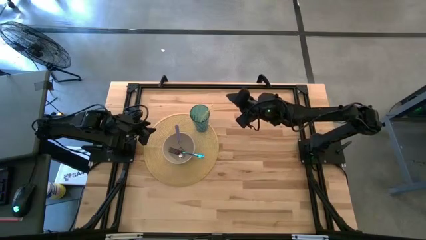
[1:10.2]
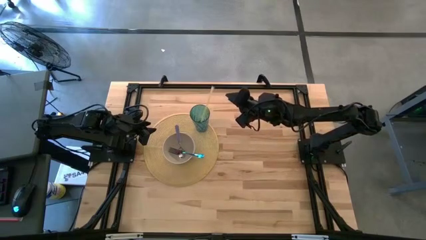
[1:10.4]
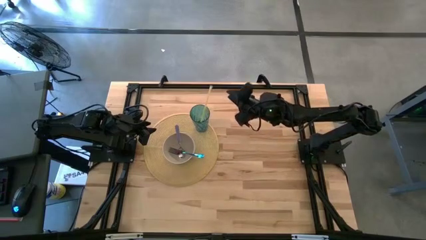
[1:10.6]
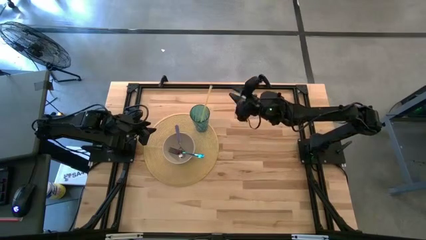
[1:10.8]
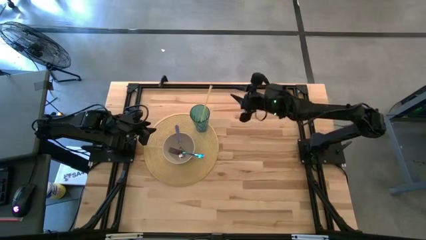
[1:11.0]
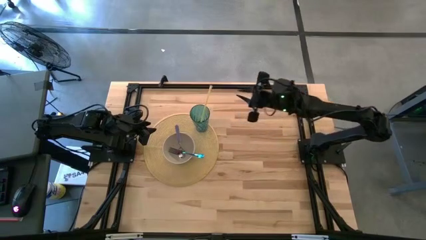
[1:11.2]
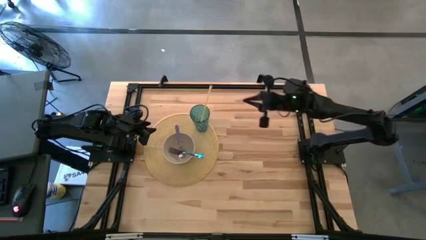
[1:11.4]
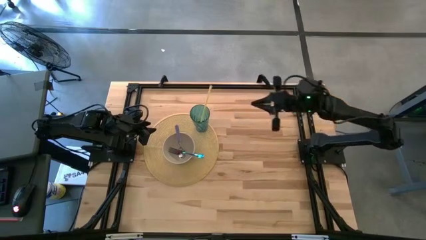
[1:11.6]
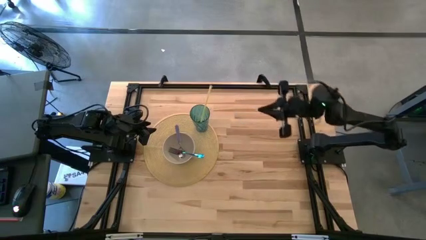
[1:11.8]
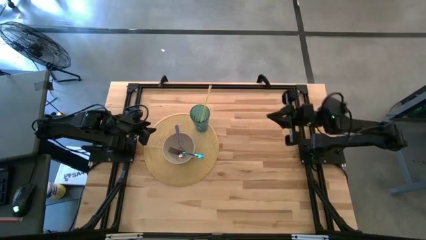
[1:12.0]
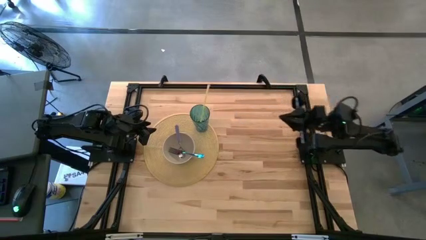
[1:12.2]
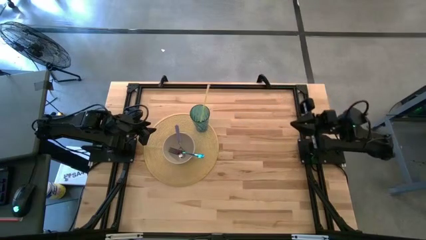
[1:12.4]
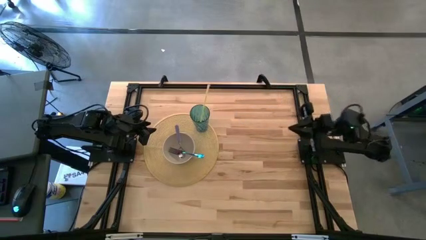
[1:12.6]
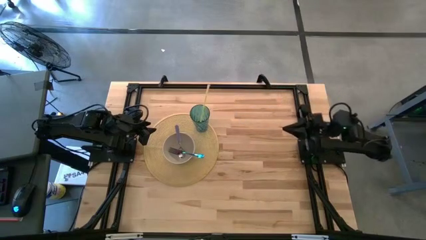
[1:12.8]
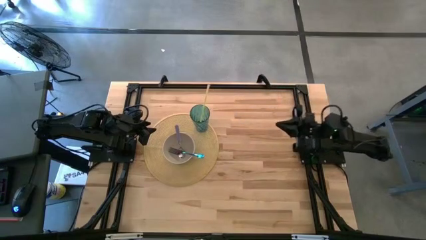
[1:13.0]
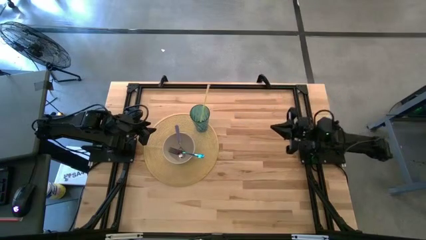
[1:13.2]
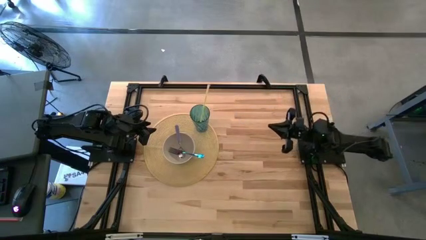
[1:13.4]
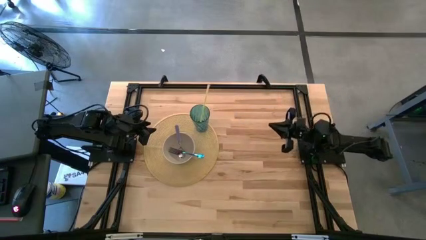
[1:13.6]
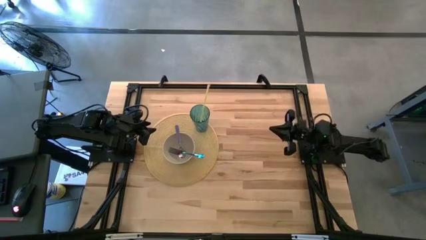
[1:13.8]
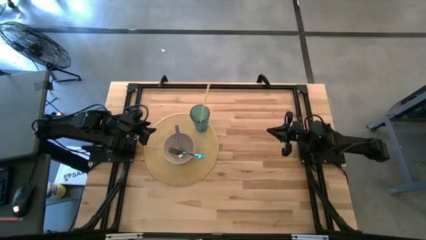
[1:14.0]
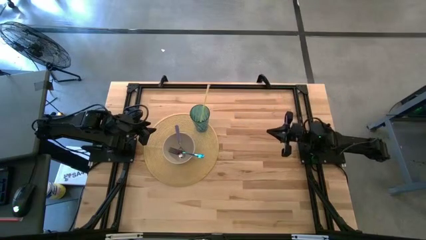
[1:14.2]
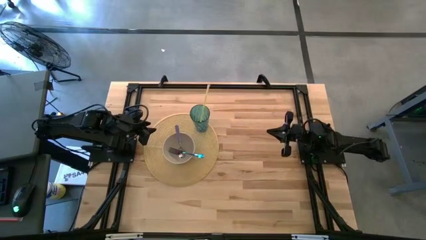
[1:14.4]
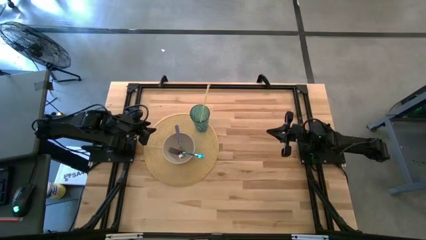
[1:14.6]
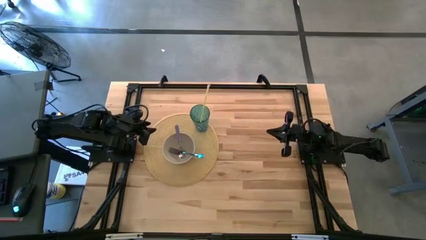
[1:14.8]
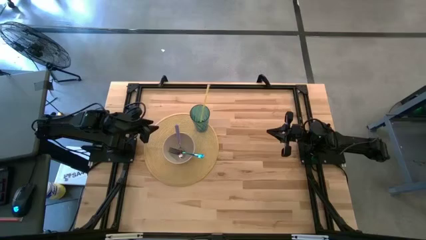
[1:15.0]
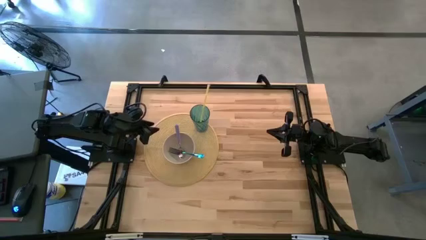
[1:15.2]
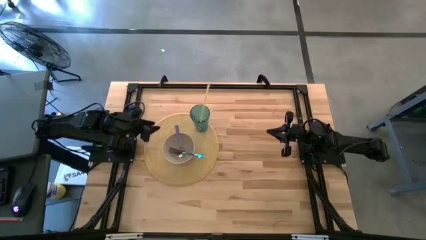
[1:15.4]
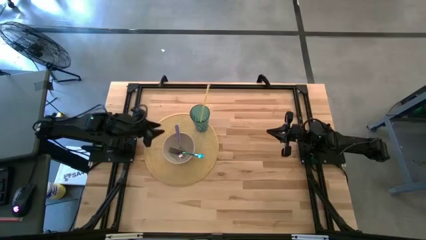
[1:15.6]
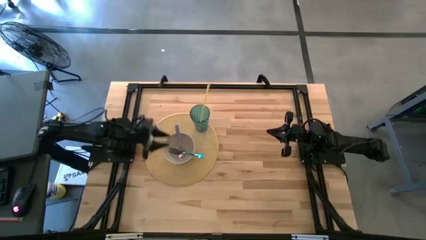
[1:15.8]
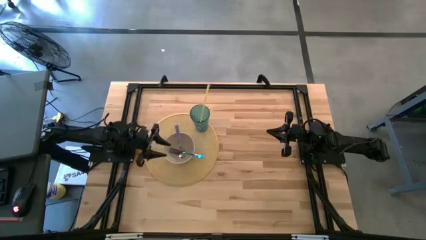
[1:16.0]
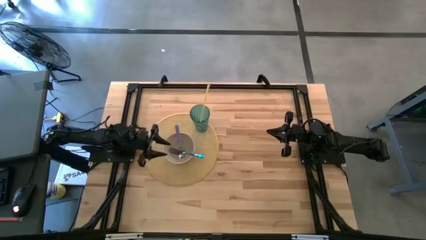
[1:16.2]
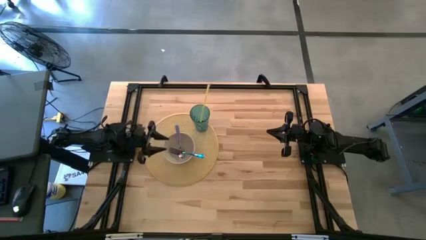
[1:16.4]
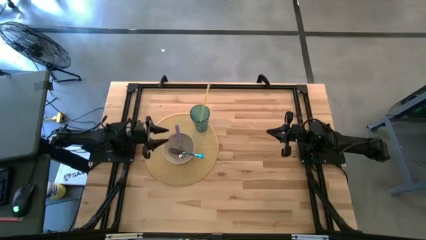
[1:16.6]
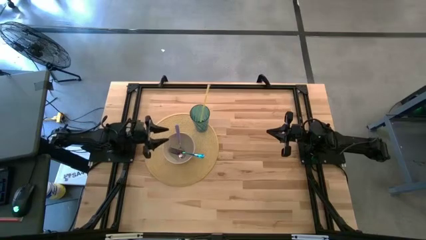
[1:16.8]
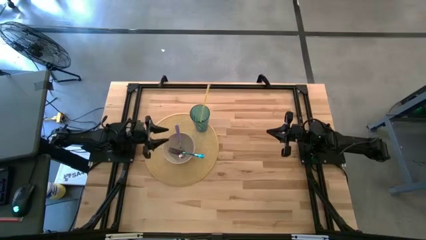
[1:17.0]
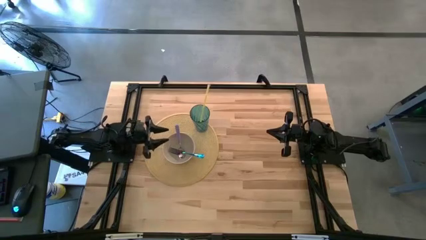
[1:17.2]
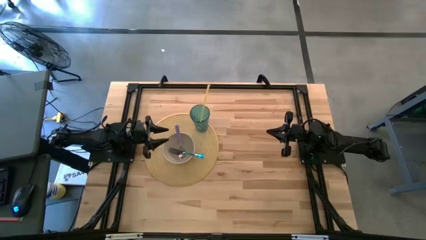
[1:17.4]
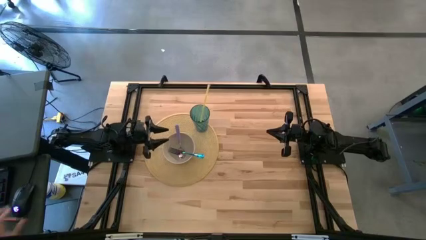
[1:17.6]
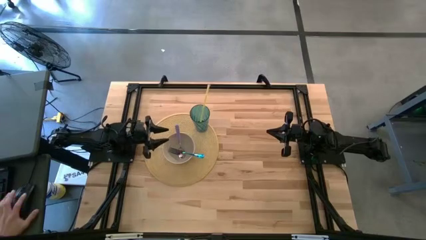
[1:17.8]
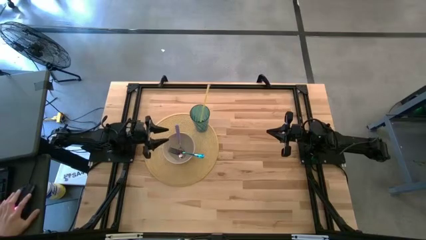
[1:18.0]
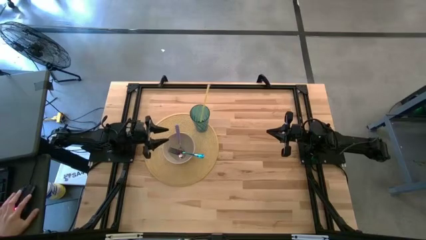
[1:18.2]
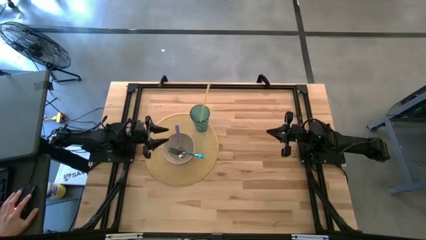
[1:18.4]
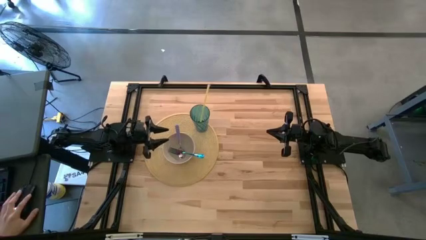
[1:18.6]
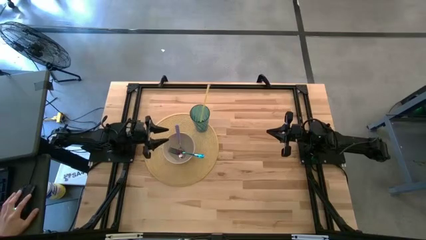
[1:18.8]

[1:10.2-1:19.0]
Task: Pick & Place Utensil
Return to Home Position

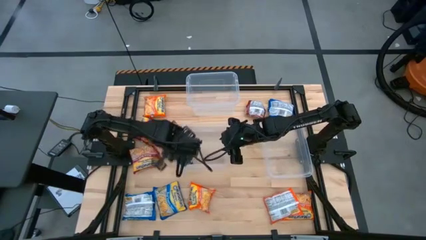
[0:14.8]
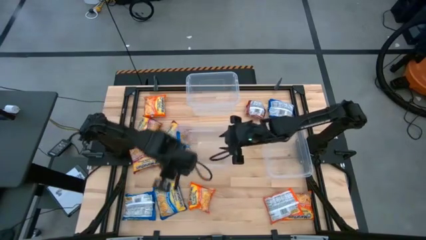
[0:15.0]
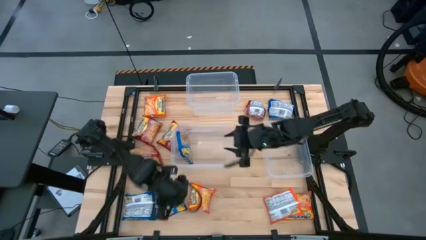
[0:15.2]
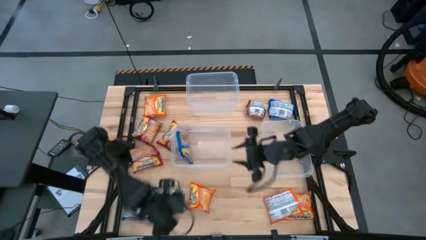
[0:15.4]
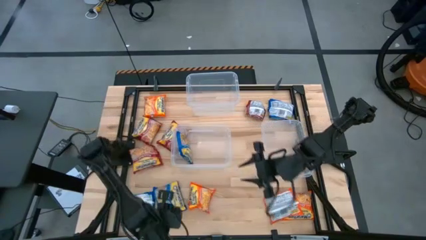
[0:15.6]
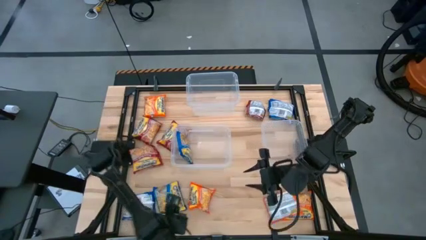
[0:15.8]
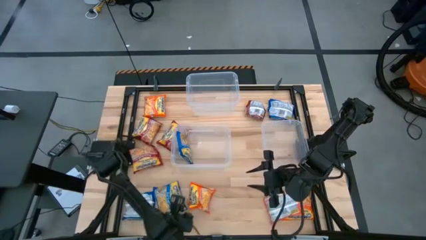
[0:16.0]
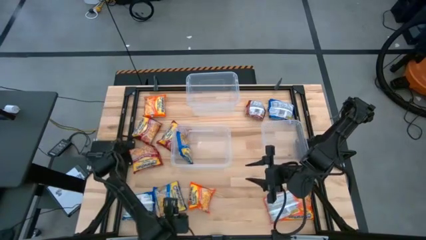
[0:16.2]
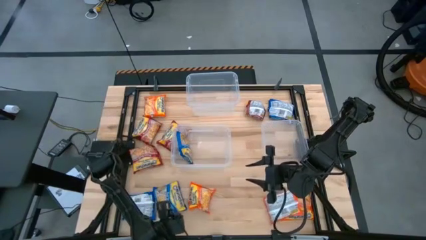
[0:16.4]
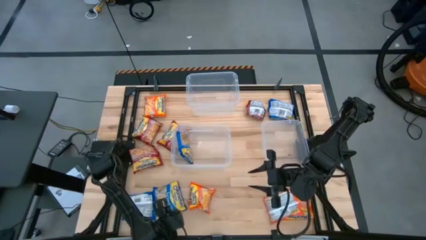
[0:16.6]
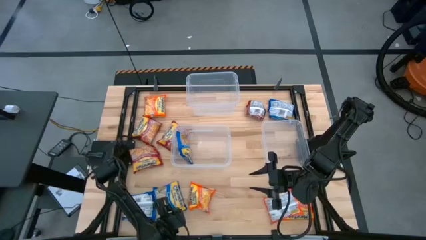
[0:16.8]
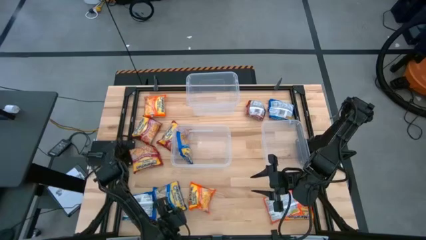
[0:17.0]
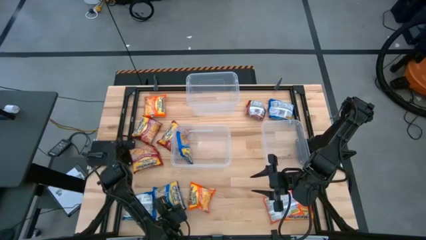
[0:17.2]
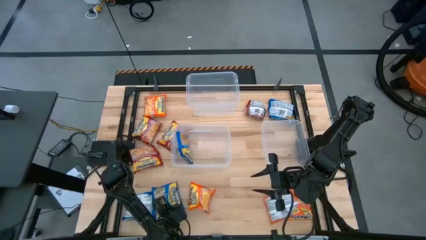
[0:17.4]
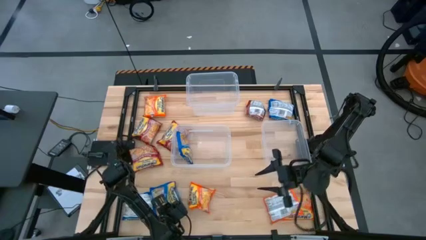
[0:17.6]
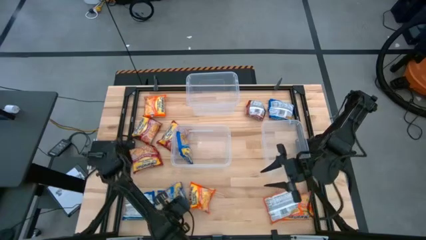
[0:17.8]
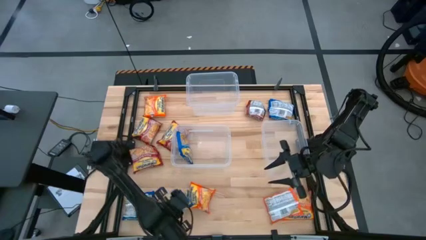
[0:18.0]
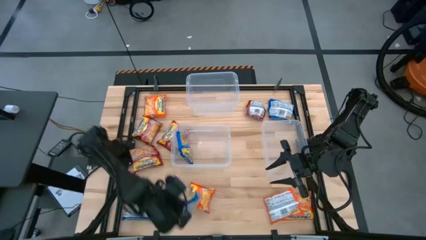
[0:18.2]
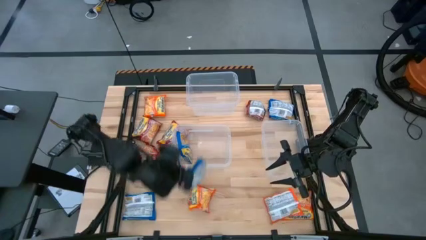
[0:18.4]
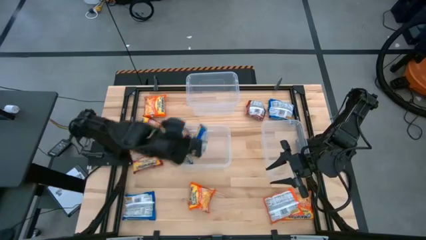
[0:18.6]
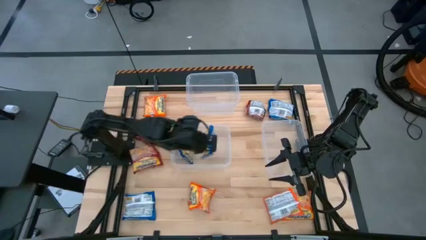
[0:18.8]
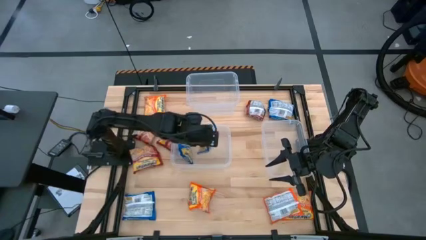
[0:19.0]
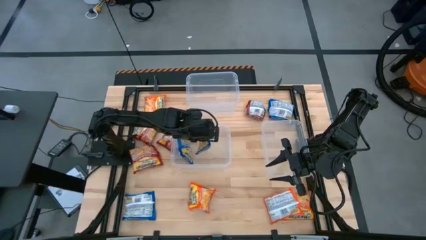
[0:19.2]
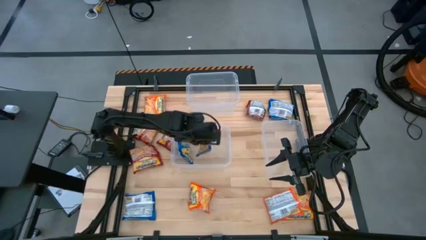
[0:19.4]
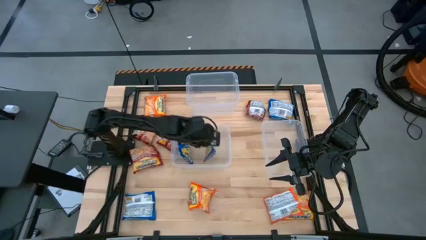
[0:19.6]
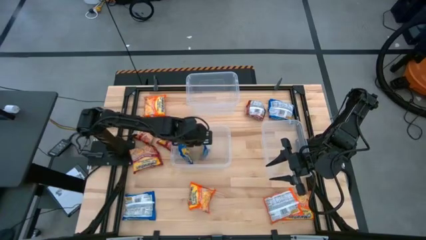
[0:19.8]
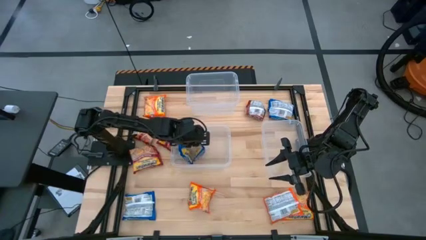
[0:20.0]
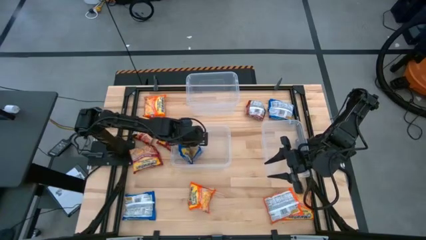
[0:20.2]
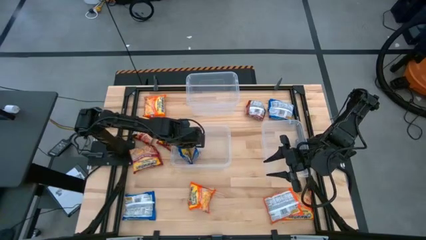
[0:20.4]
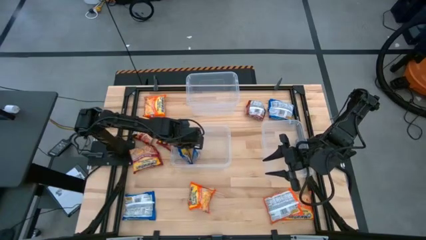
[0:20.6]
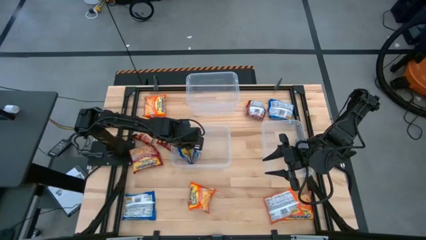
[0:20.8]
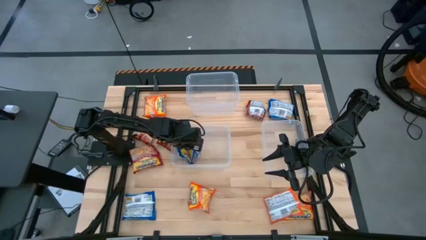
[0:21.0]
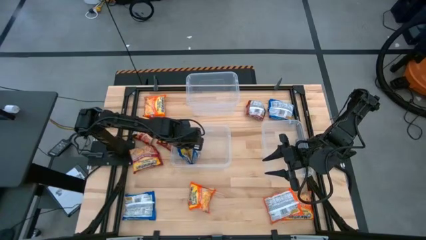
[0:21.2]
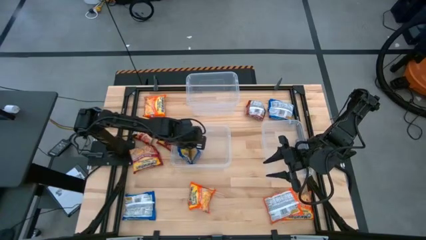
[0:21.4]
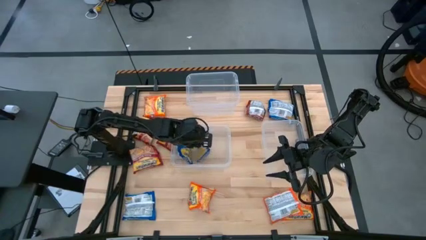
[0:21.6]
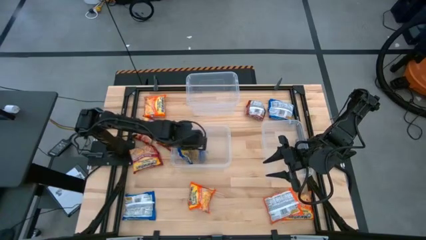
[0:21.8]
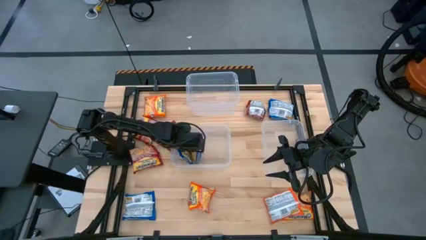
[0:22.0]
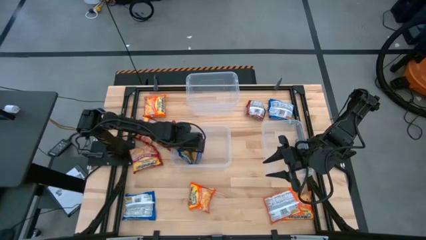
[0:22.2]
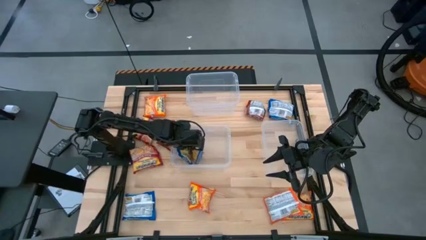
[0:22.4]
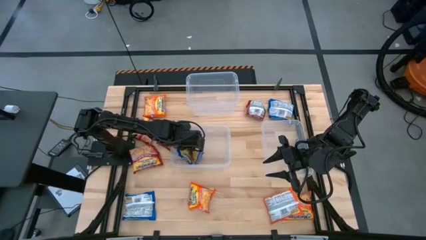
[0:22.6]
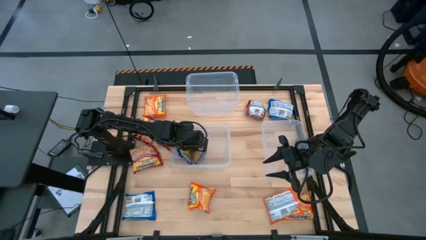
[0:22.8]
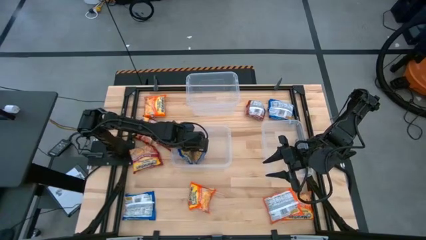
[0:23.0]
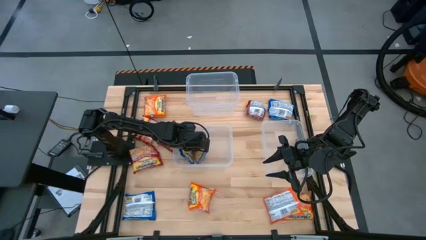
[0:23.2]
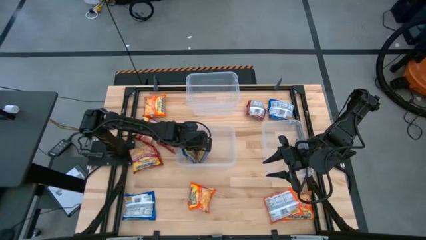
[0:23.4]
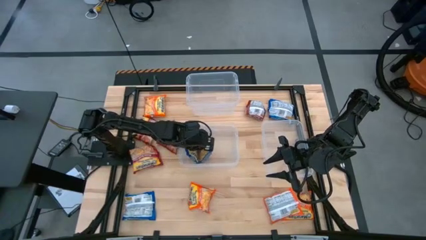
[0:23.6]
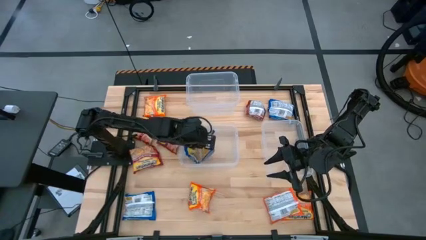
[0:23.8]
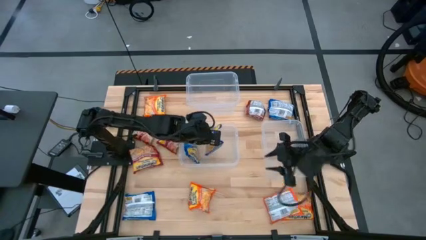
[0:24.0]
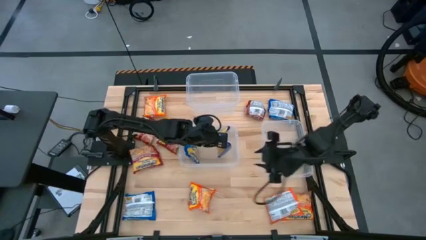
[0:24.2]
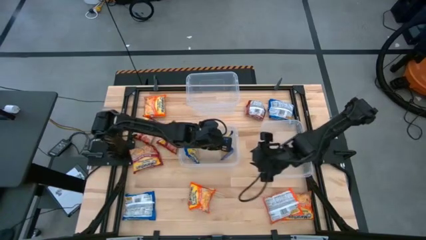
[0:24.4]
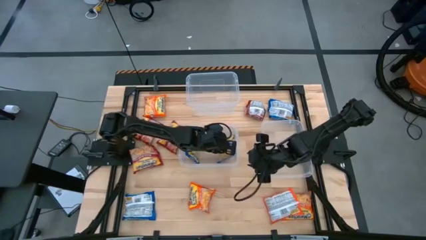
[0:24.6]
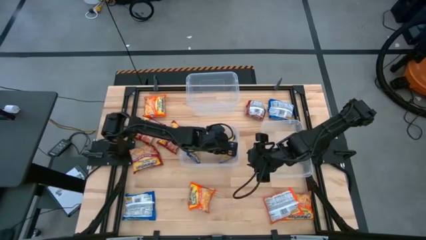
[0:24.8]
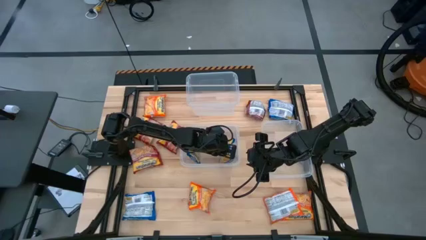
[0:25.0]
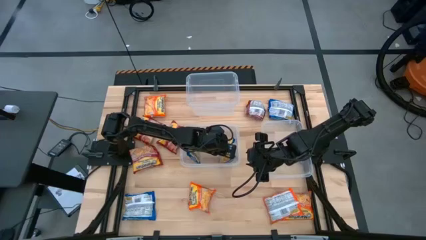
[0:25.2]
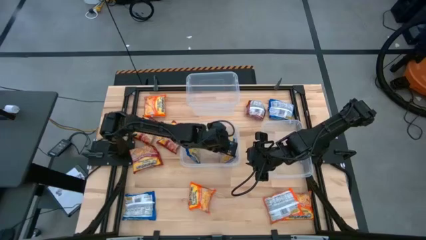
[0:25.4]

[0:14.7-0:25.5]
Task: Sort Maruchan noodles
Put the blue noodle pack into the bottom left transparent bin
